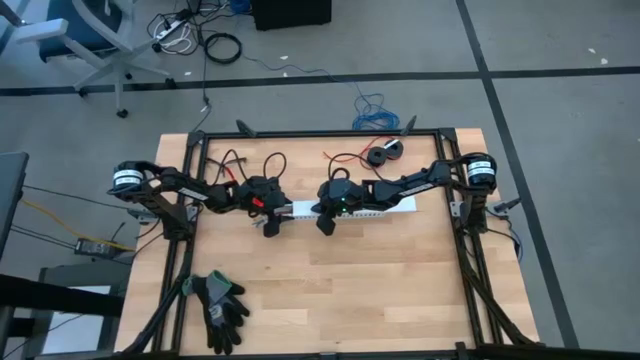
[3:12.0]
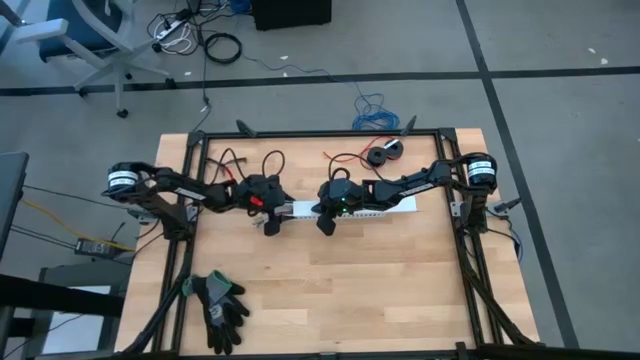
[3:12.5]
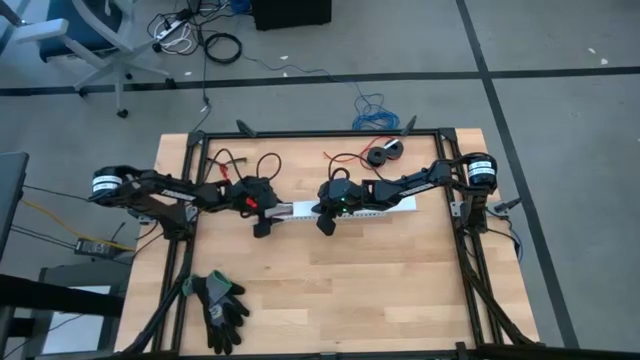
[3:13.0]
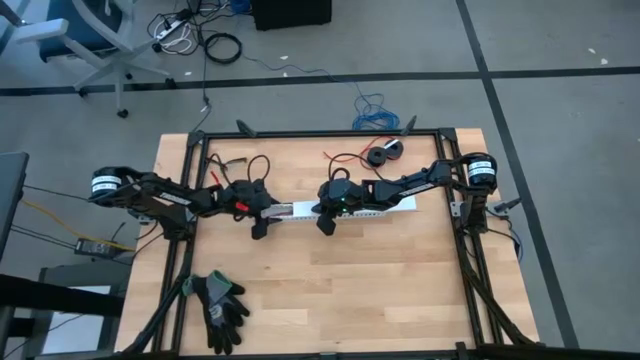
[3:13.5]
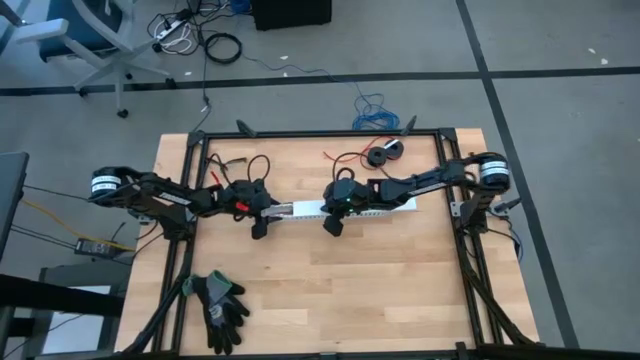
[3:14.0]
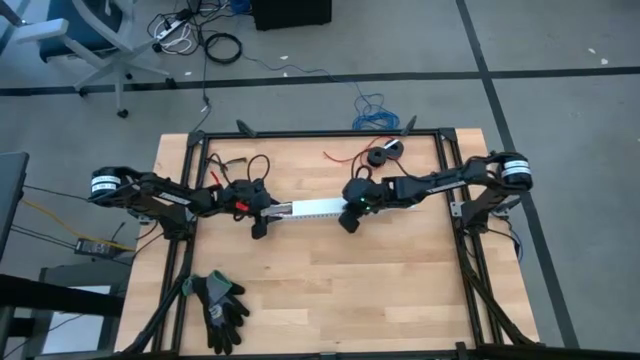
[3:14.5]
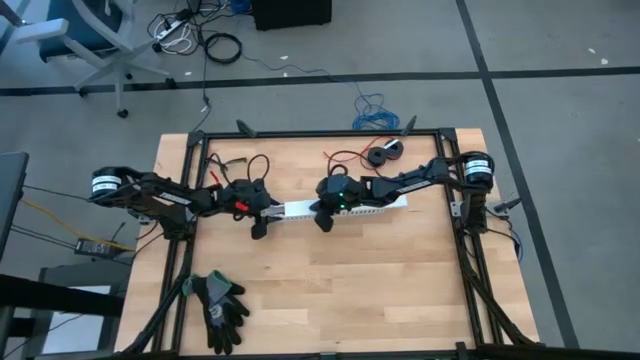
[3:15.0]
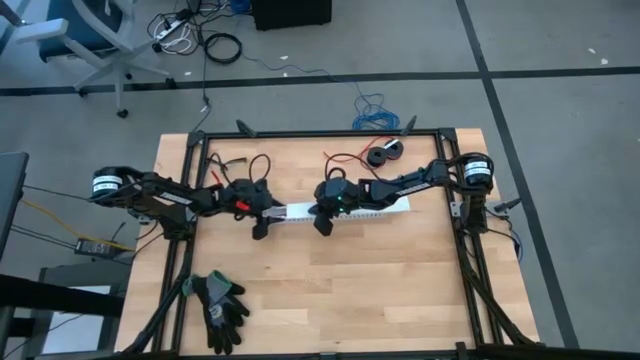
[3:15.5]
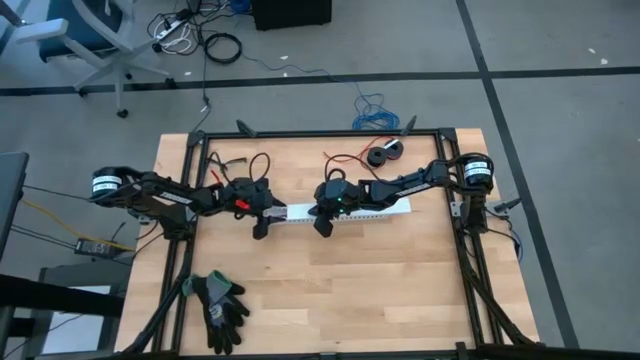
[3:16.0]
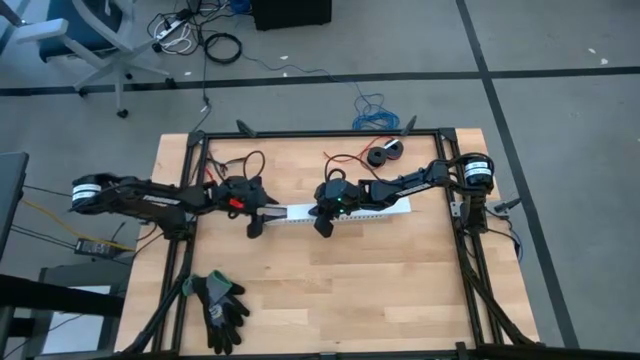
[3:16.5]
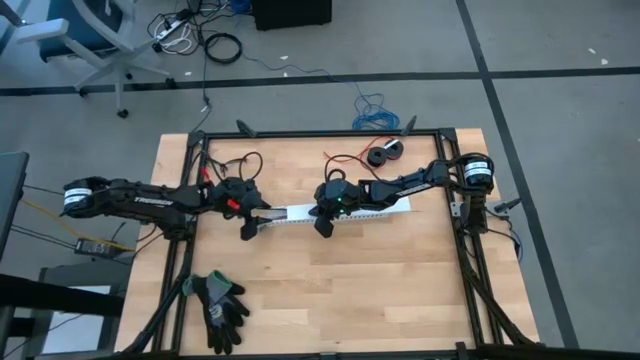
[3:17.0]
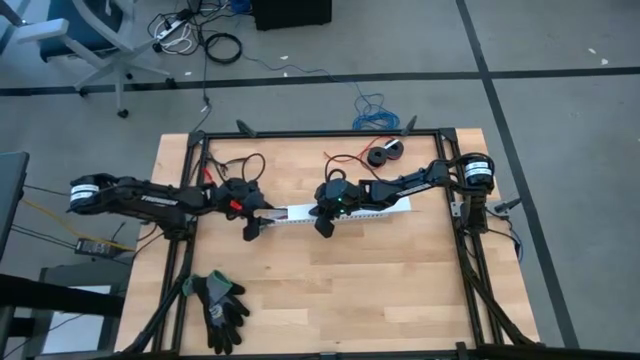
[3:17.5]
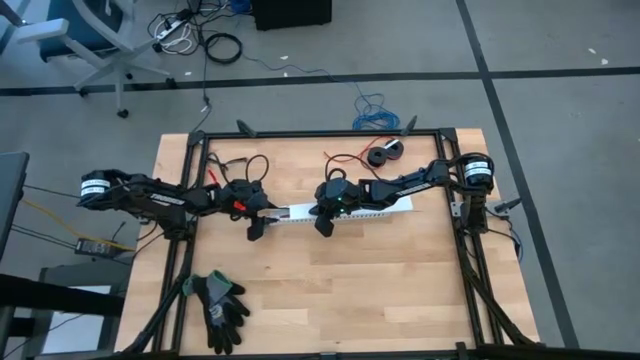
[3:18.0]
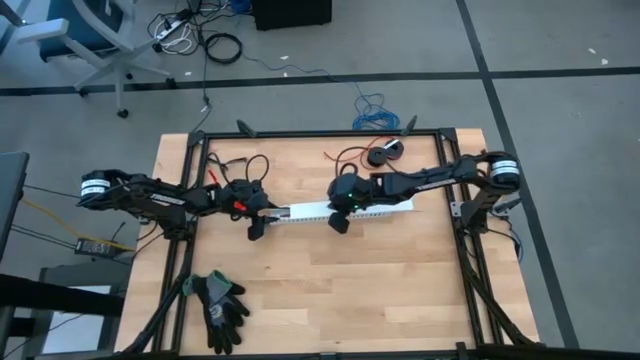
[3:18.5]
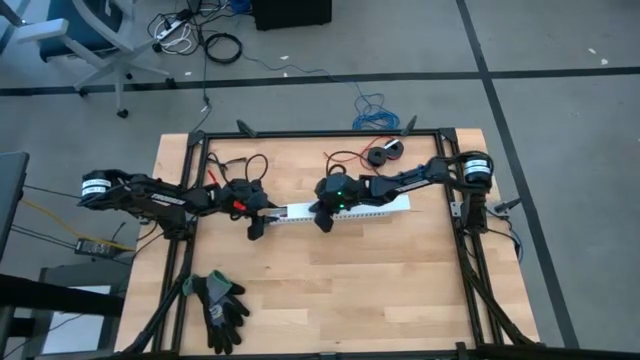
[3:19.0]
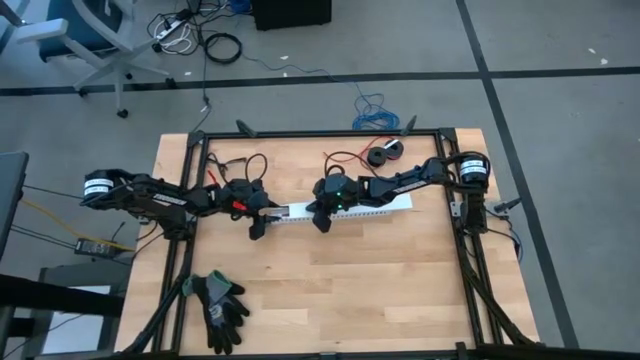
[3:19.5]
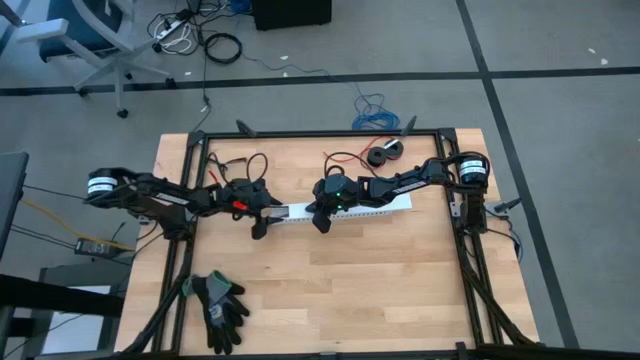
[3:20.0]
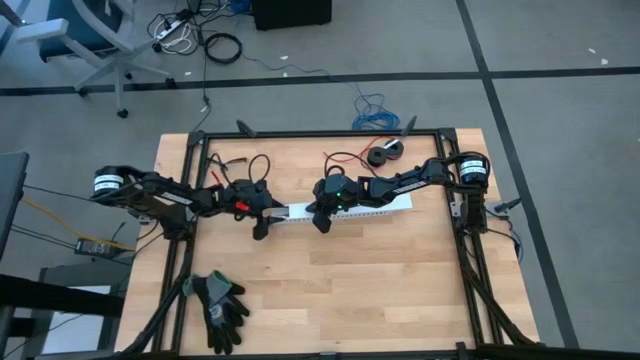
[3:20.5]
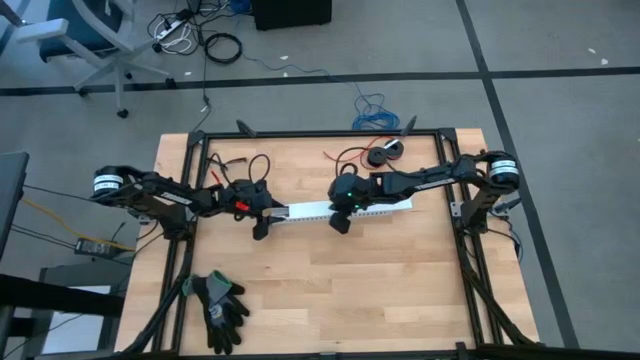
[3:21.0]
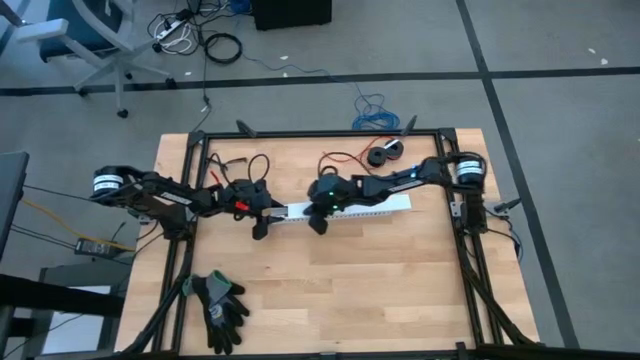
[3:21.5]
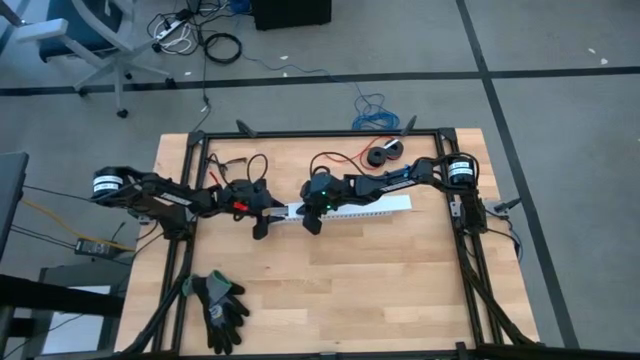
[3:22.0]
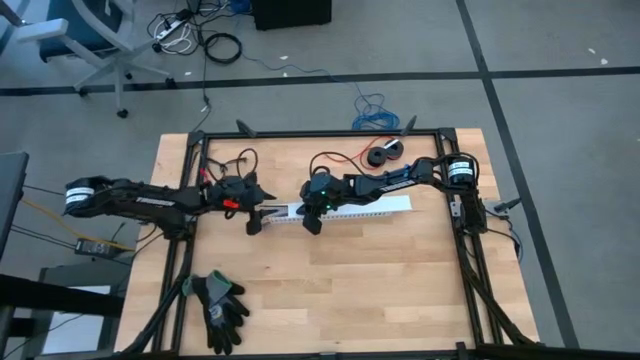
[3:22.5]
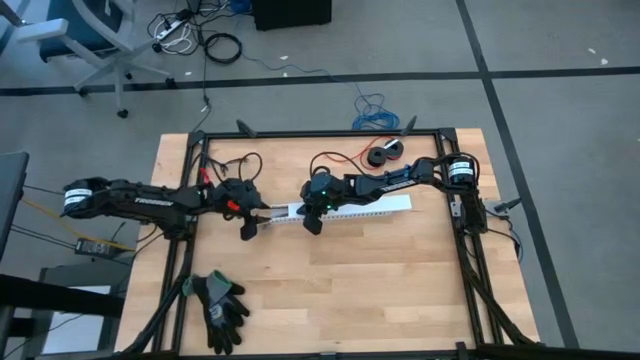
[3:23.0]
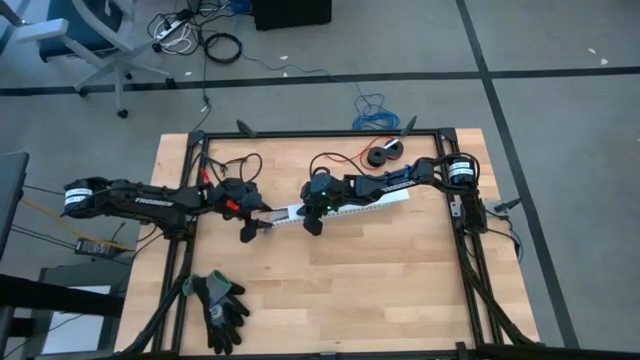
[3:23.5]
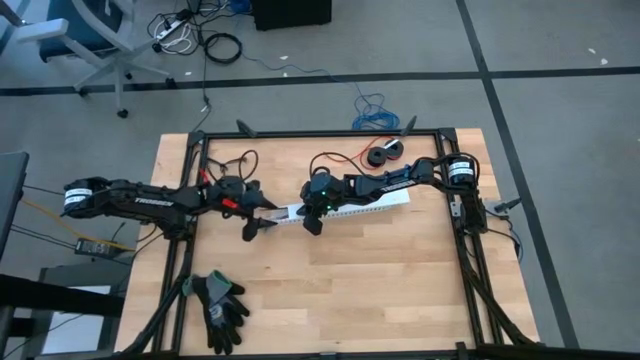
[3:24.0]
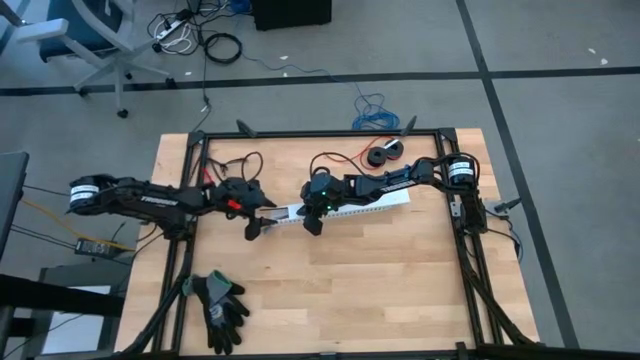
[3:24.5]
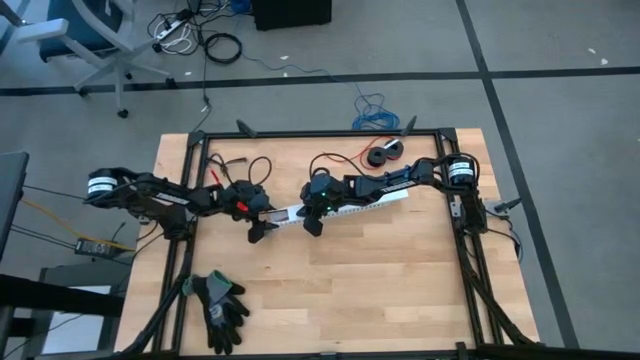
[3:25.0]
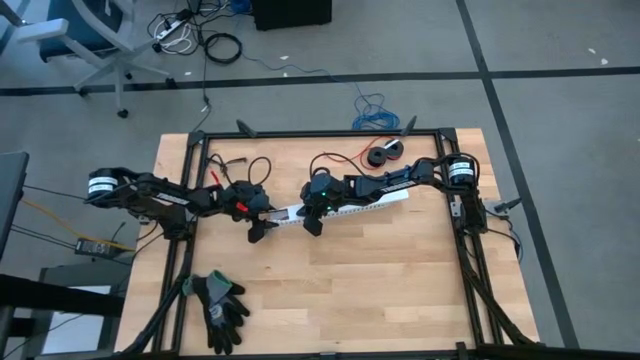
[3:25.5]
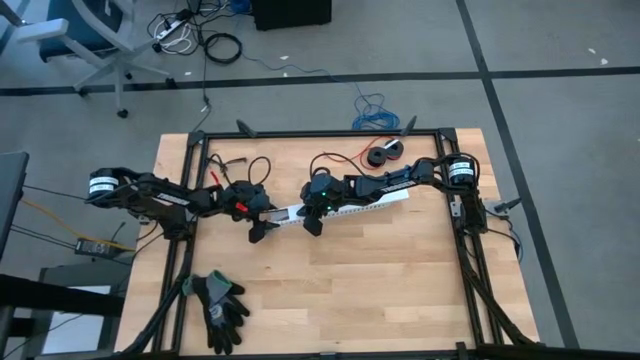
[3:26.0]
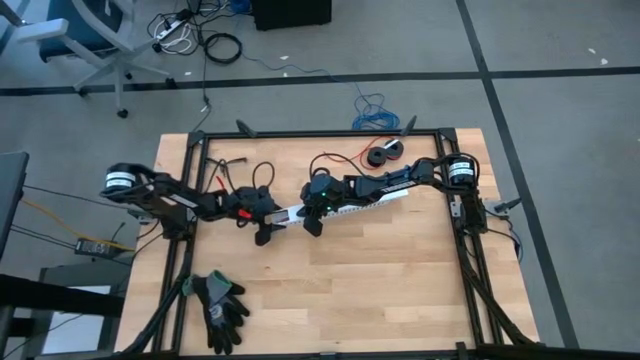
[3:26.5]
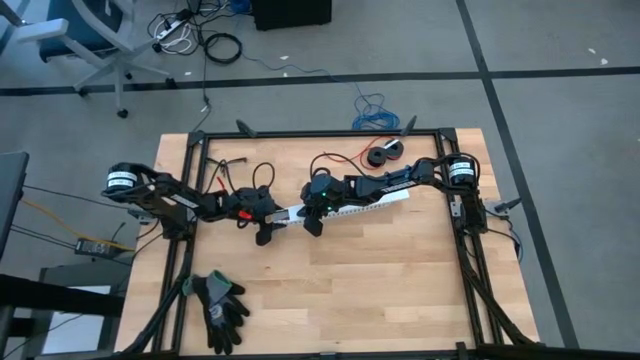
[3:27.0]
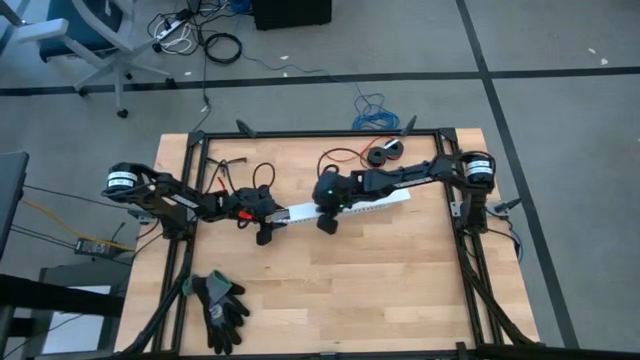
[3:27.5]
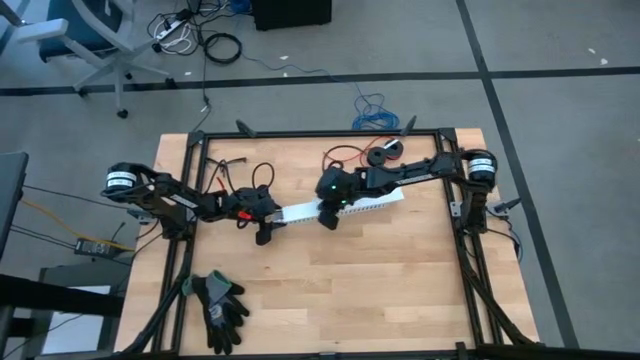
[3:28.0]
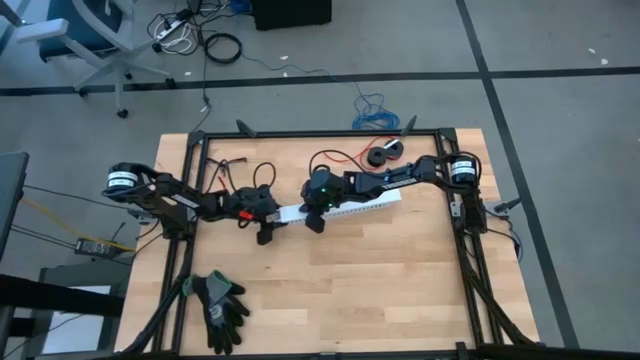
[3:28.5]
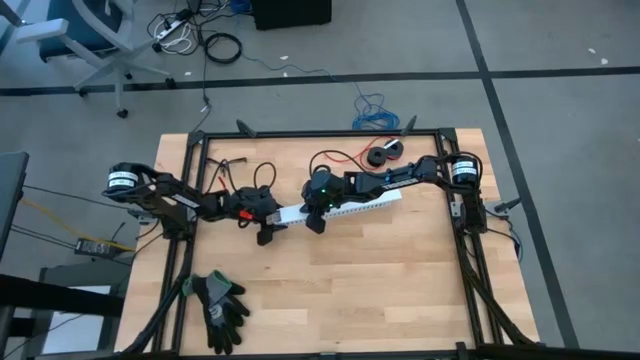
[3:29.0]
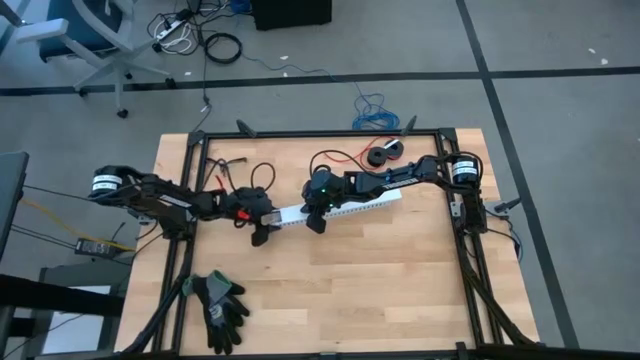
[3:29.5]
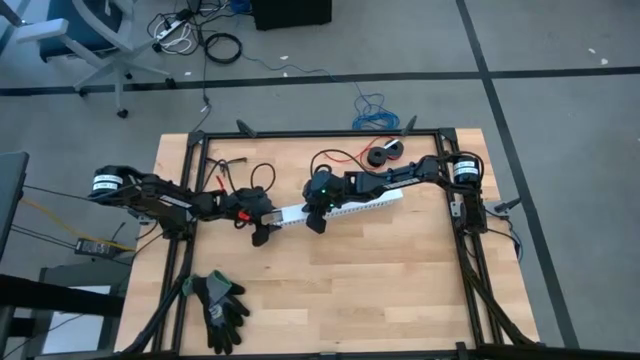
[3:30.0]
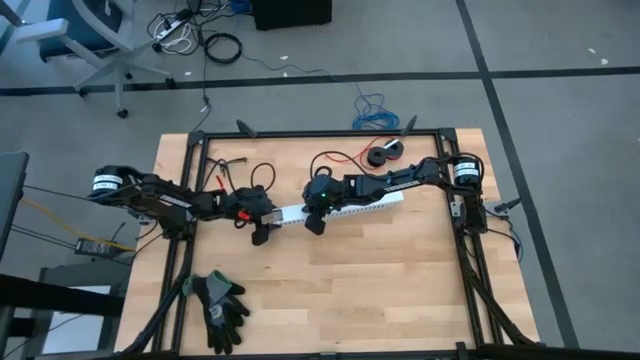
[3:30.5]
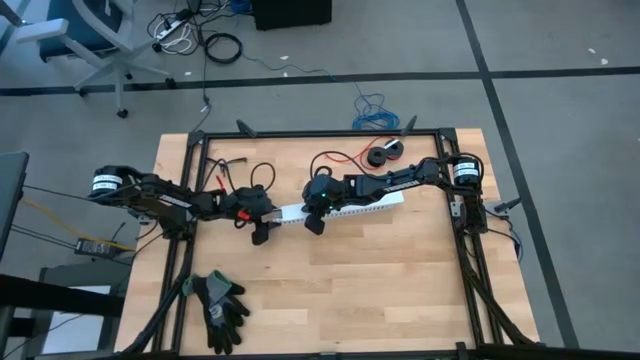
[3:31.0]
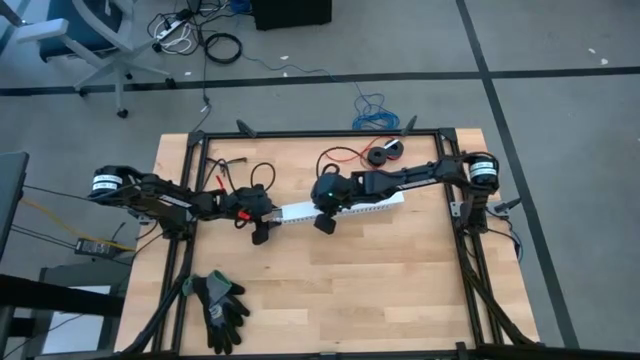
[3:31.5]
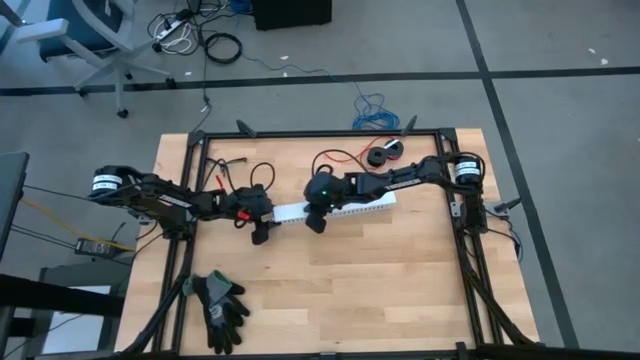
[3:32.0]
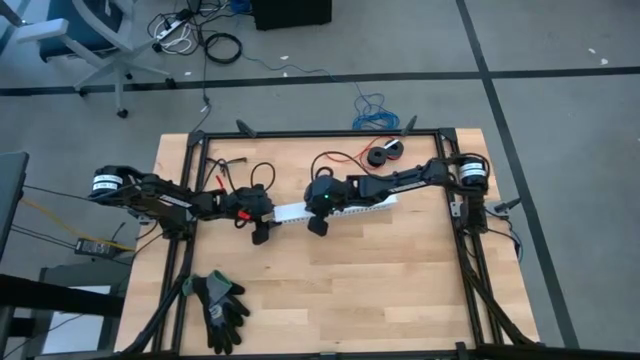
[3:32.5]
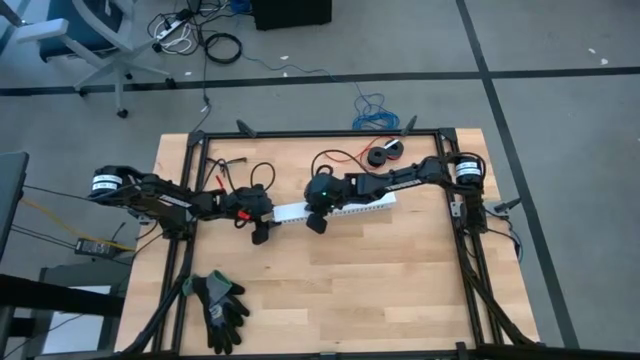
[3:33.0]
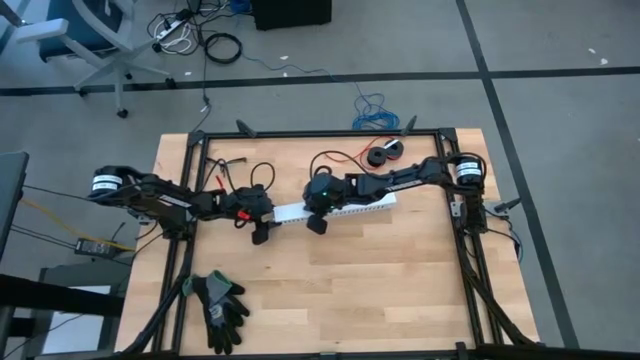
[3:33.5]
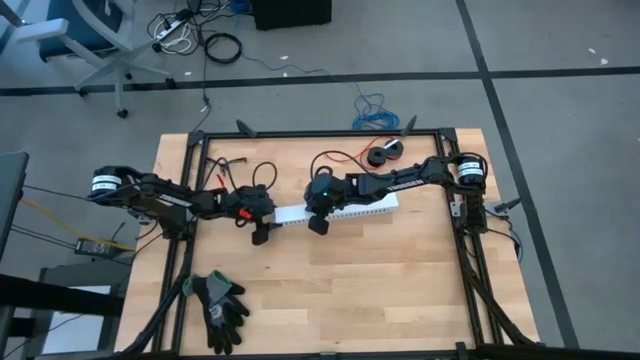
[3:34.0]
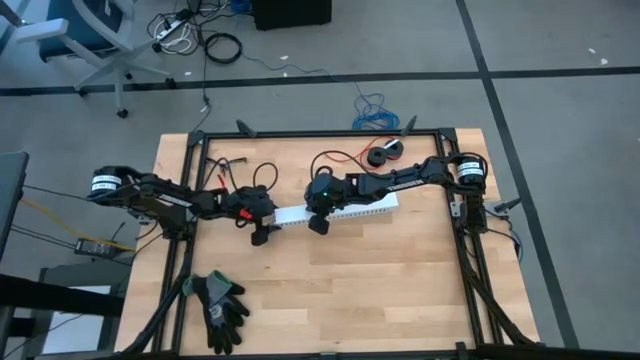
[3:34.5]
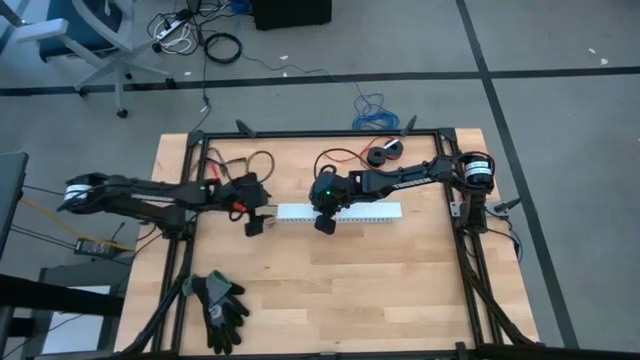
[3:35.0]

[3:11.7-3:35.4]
Task: Ziptie cables
Close the white cable duct cover
